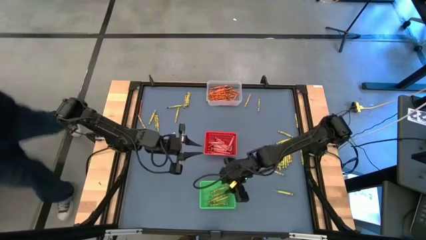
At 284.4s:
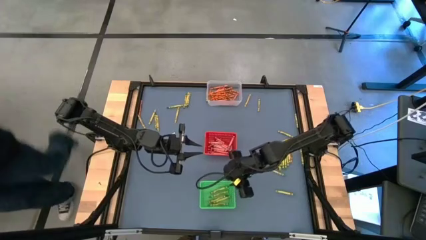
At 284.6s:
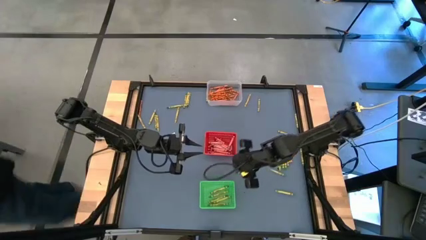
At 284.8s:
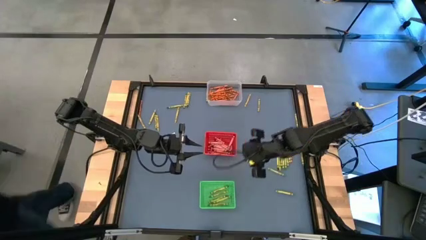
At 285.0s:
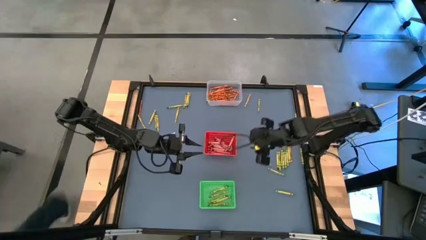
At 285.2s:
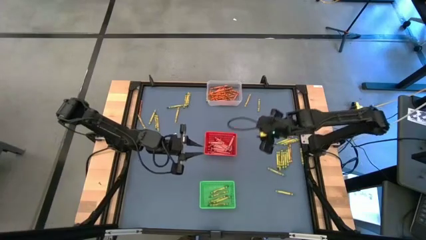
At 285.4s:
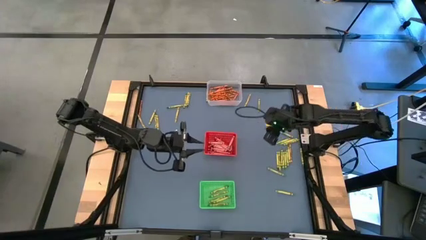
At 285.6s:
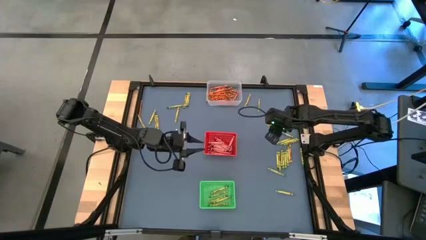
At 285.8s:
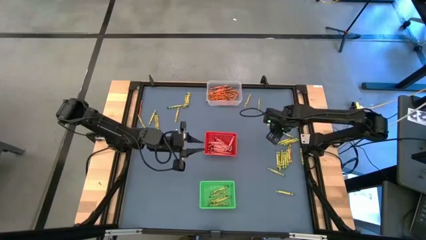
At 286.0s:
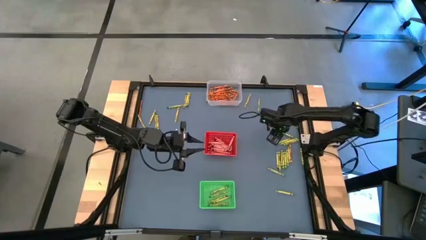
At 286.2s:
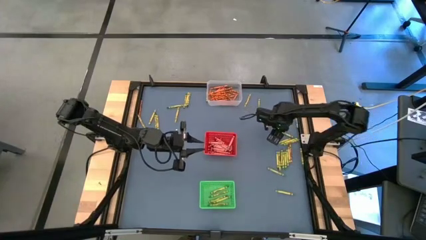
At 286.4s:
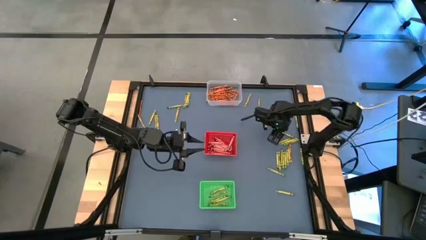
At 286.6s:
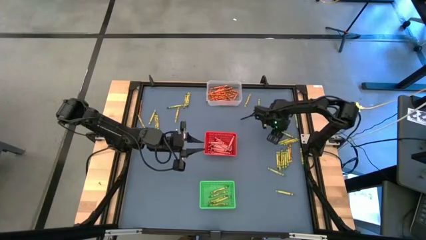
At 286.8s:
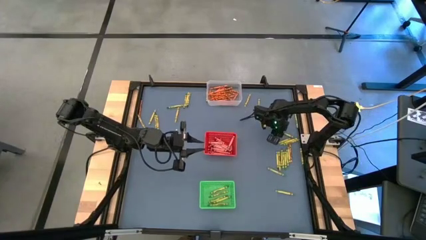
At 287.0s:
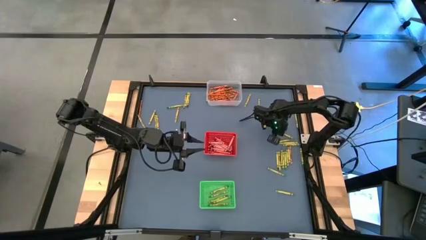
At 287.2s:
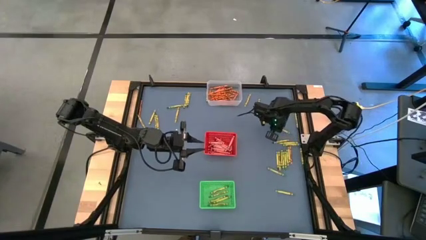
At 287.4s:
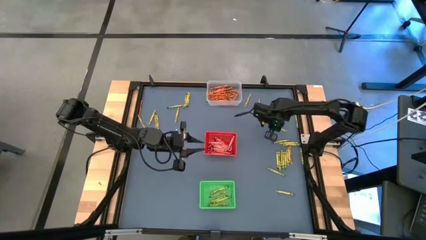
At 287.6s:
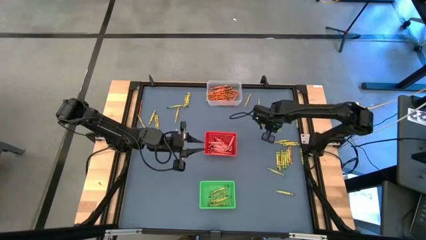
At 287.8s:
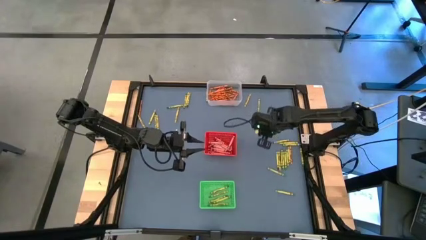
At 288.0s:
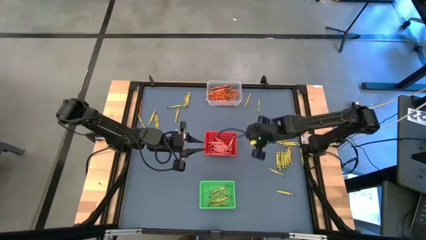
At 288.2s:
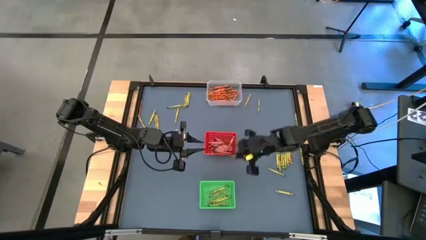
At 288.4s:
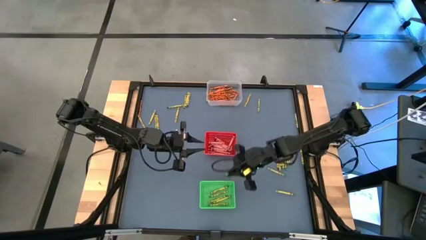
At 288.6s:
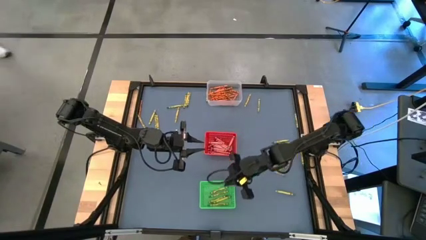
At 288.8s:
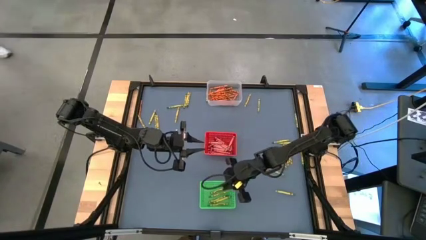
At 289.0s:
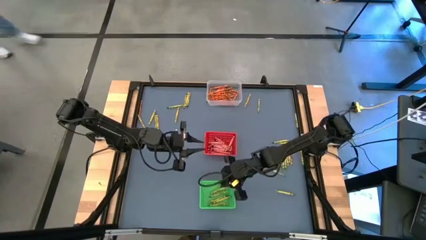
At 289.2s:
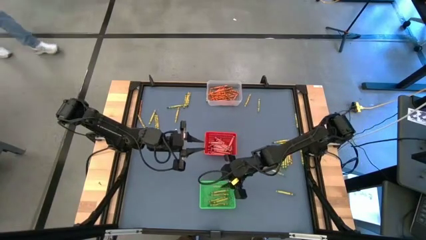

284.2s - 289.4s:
Task: Sort crayons
Put the green crayon into the green bin

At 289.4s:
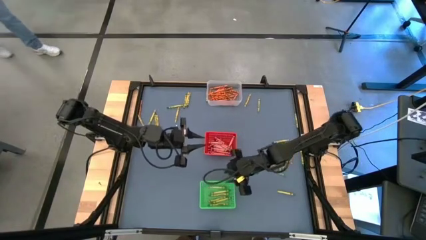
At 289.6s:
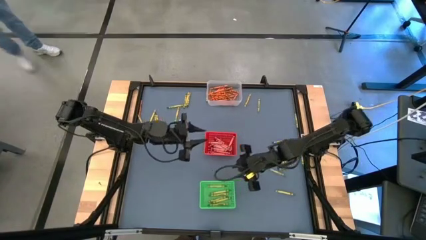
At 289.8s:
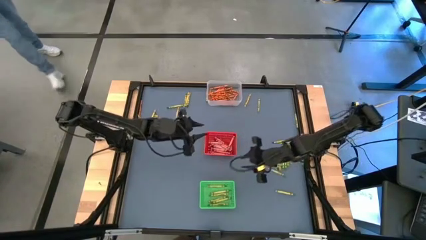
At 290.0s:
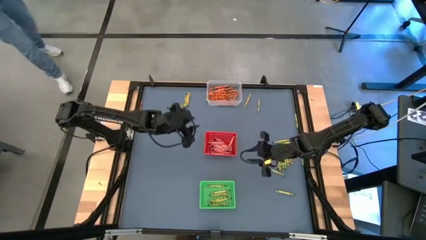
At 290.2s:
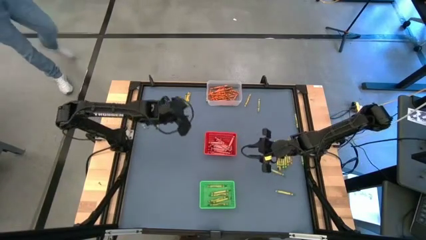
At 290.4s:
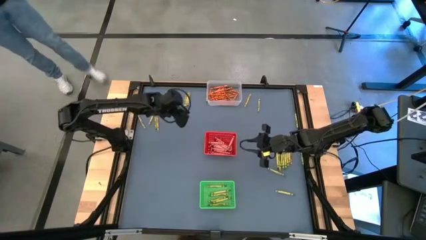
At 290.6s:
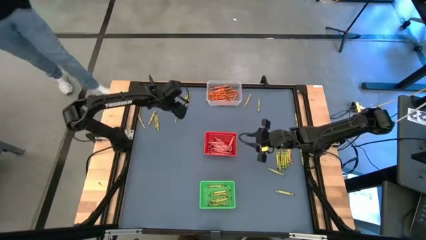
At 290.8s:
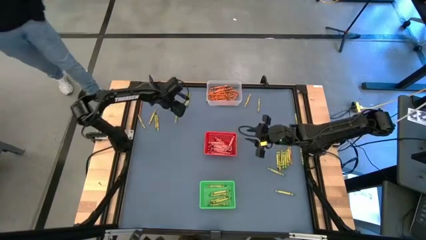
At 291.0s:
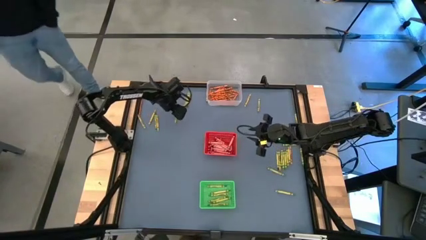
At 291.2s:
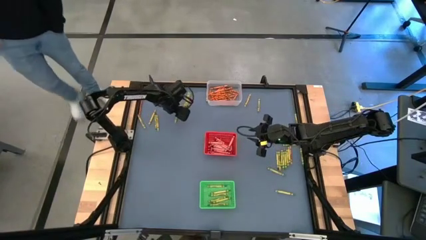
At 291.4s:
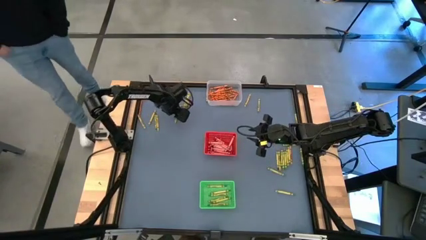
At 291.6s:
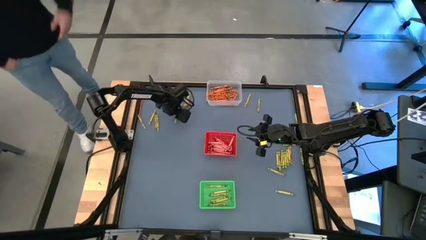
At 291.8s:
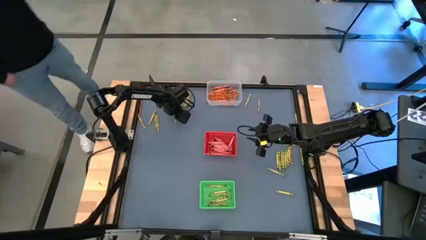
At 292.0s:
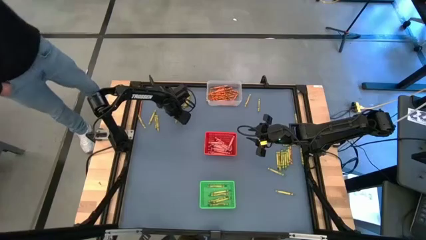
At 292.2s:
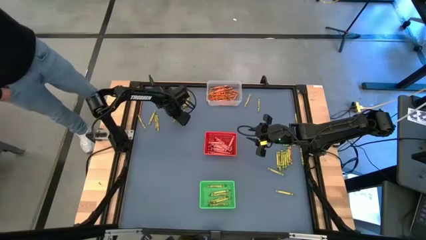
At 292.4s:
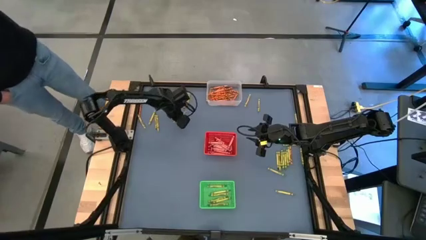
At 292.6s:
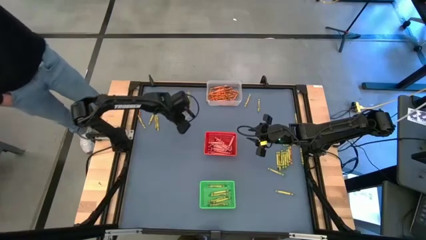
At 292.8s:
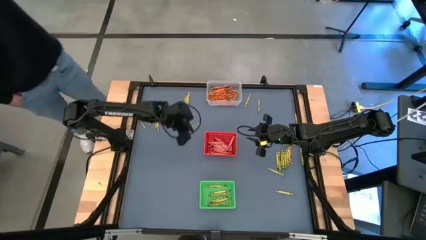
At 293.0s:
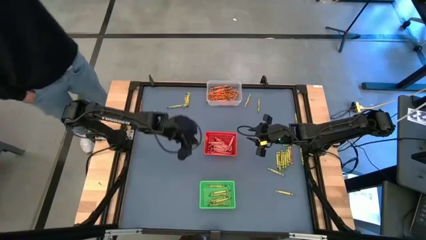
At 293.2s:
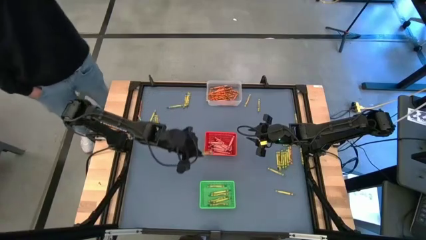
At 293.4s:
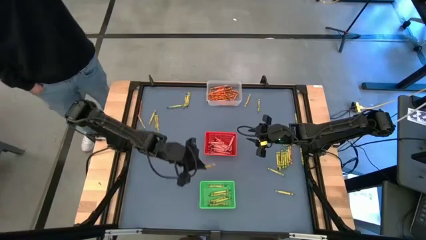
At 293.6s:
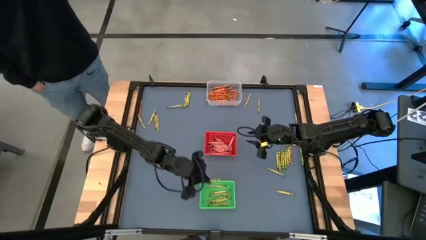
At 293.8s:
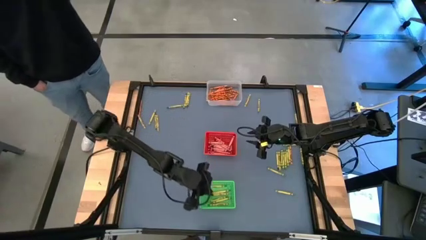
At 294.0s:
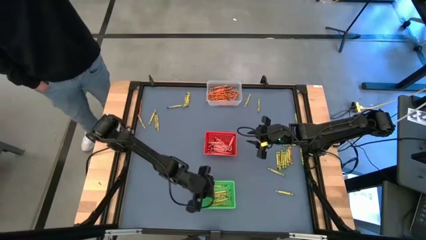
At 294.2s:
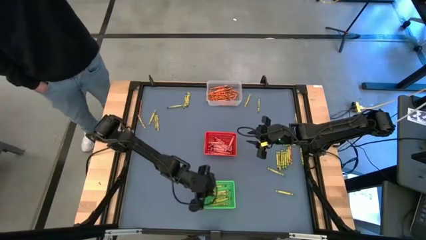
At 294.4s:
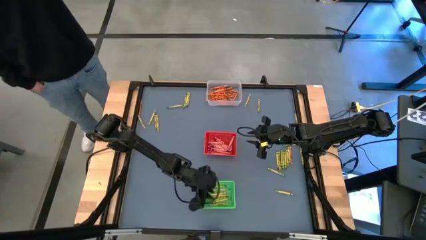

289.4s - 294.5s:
Put the yellow crayon into the green bin

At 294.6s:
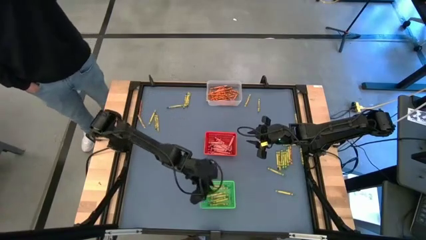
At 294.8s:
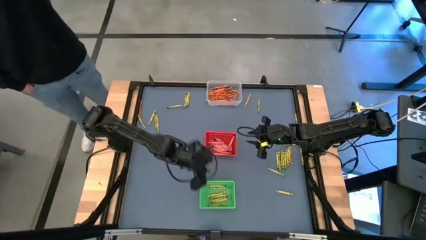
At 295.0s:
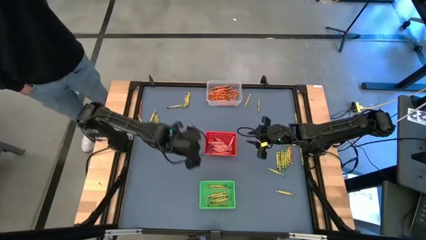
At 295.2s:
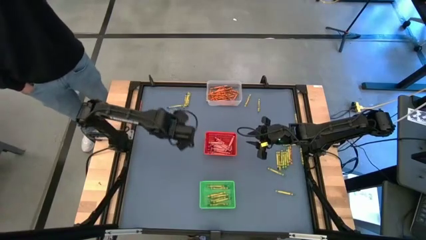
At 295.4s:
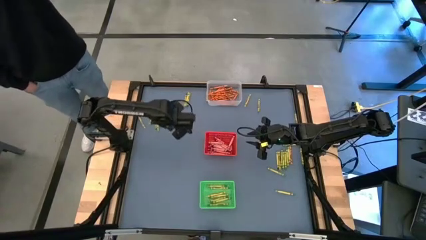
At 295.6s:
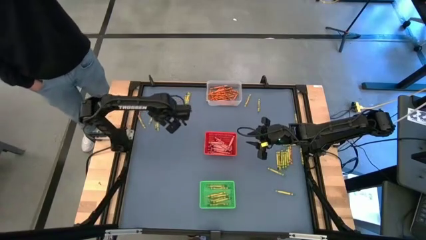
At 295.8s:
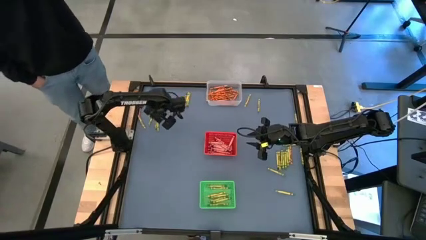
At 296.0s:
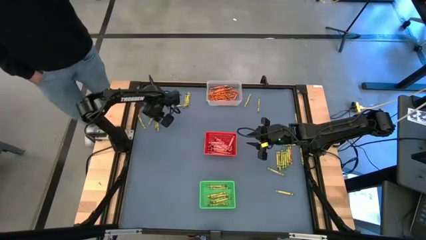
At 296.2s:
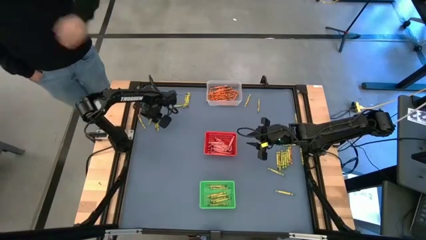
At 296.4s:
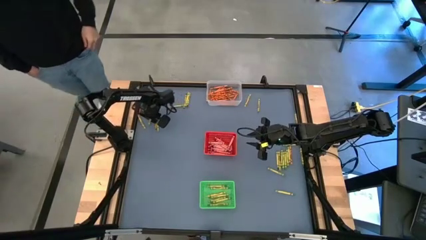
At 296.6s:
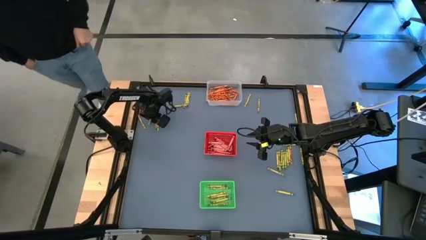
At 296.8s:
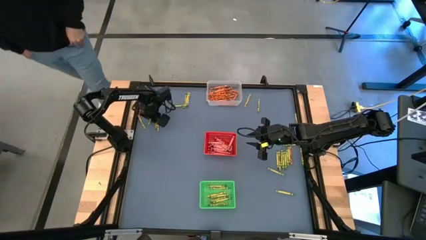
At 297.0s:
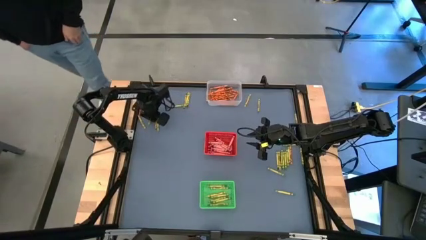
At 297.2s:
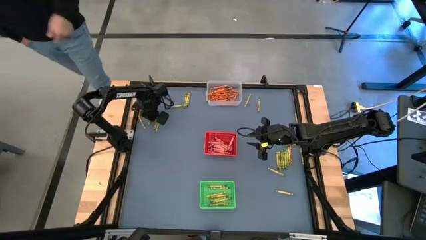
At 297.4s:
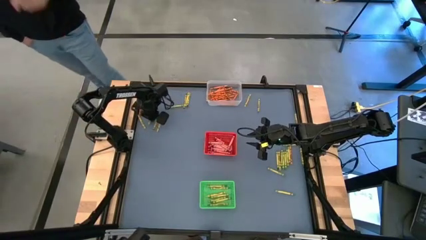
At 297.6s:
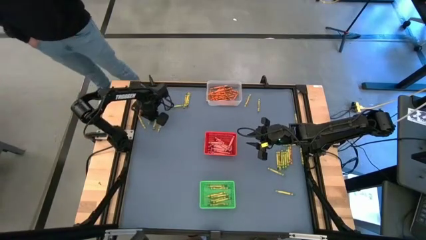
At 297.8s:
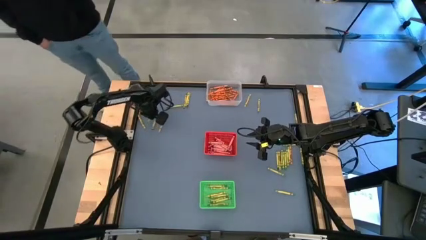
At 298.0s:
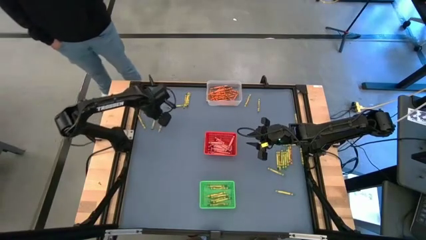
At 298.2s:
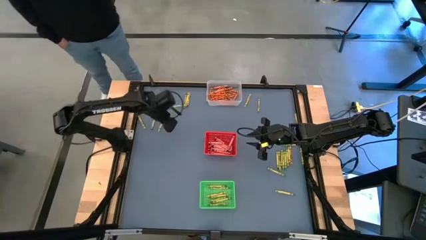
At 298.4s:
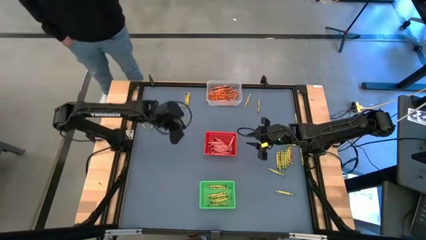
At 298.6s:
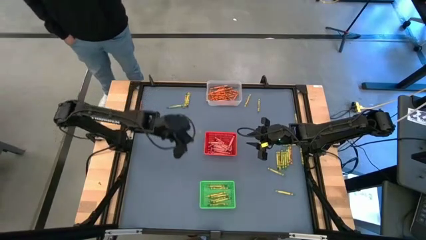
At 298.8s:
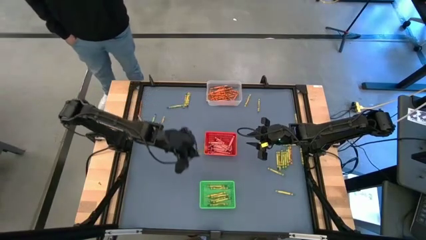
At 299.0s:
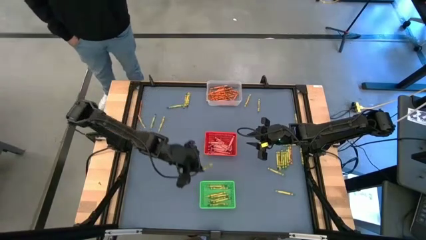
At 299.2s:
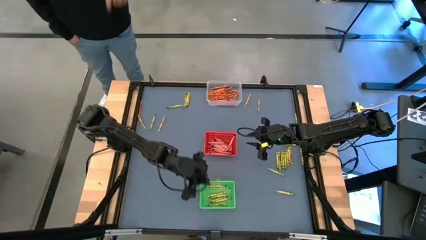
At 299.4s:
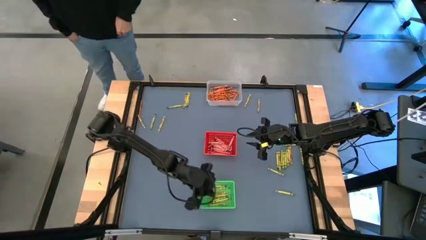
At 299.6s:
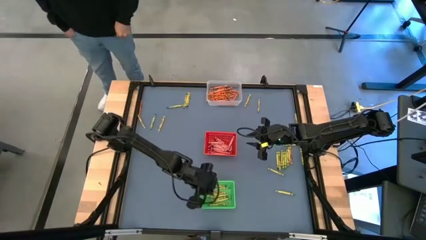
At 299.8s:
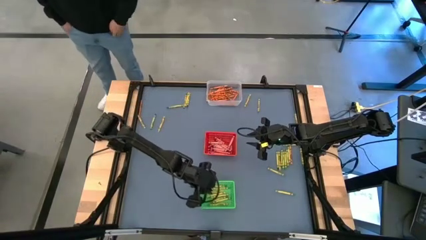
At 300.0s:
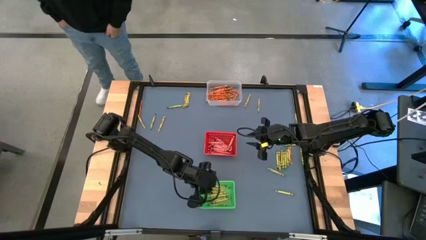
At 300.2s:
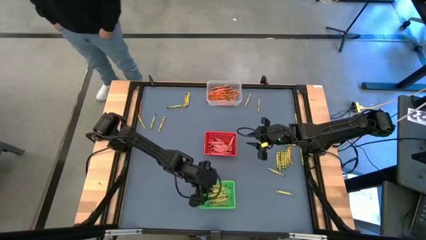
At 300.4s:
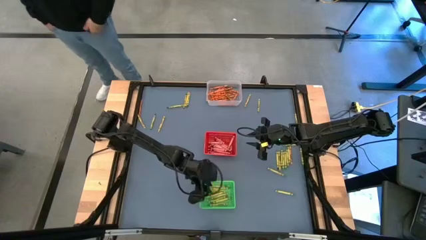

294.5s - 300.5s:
Put the yellow crayon into the green bin
